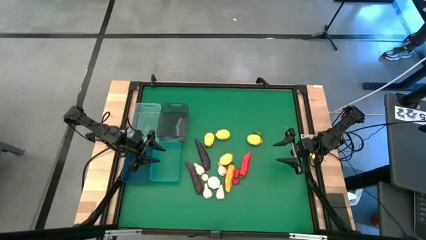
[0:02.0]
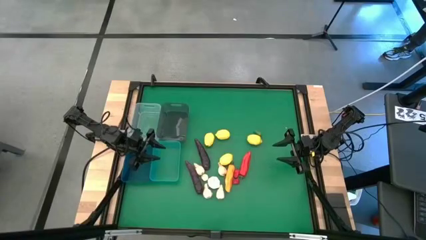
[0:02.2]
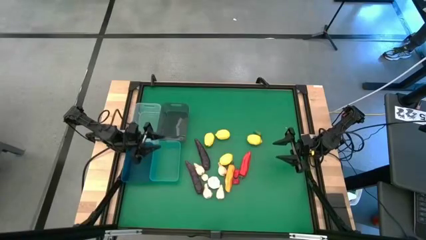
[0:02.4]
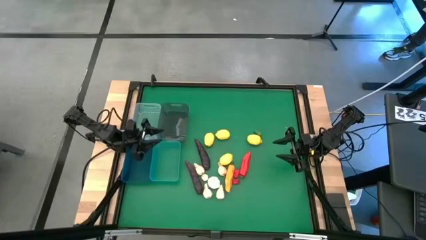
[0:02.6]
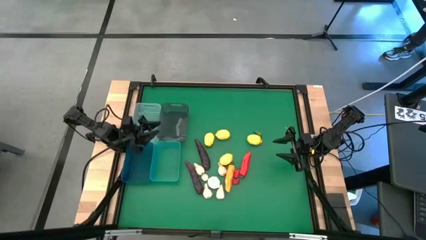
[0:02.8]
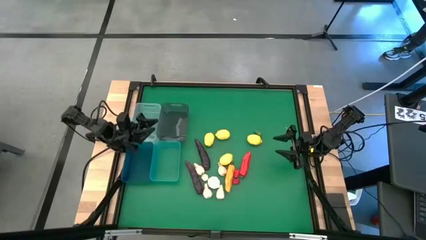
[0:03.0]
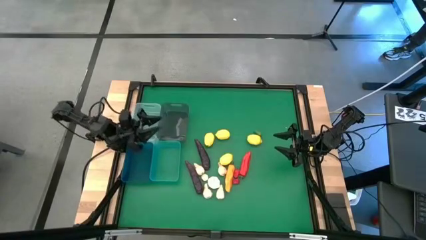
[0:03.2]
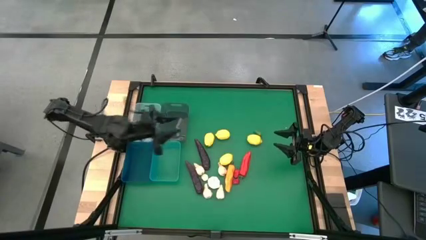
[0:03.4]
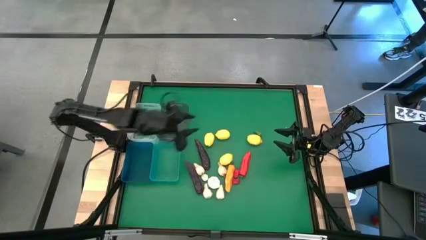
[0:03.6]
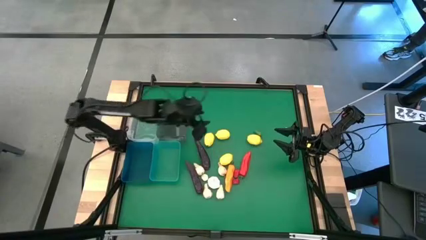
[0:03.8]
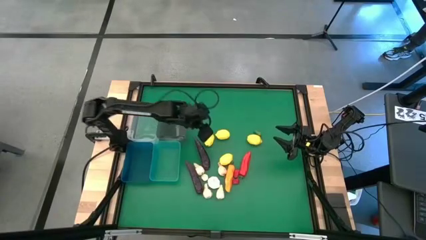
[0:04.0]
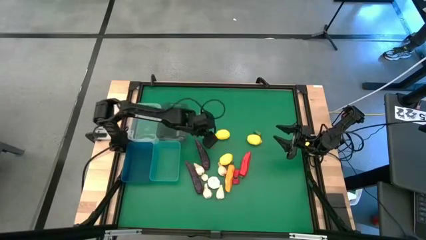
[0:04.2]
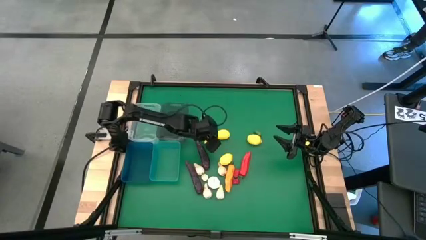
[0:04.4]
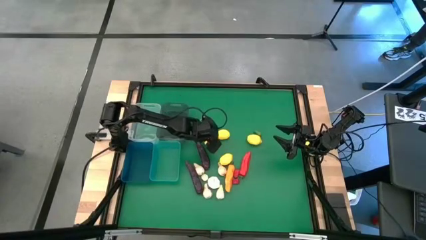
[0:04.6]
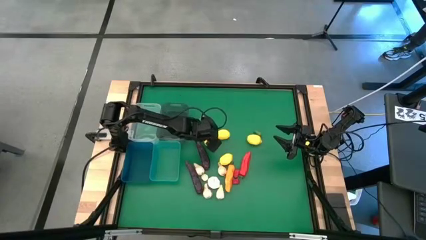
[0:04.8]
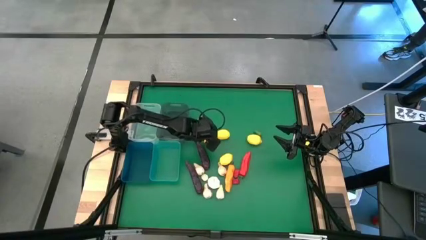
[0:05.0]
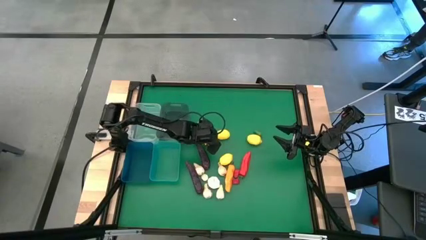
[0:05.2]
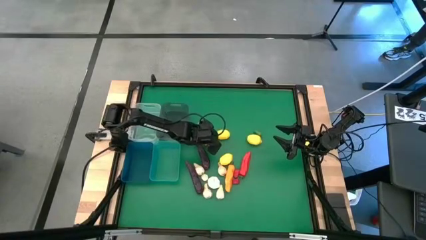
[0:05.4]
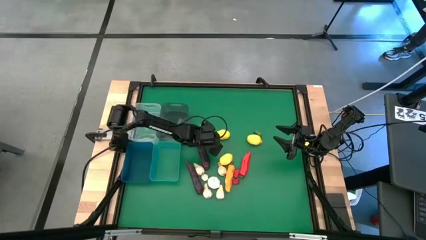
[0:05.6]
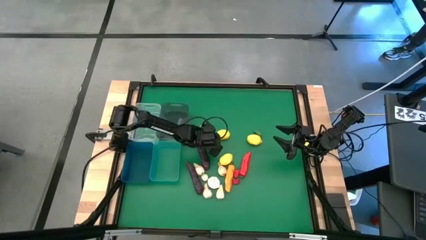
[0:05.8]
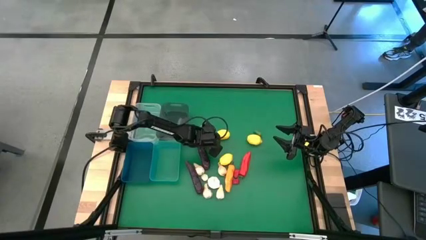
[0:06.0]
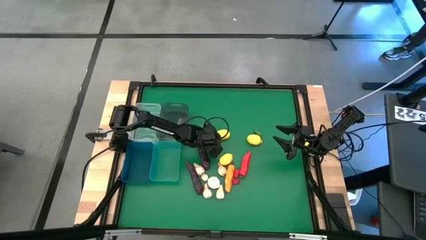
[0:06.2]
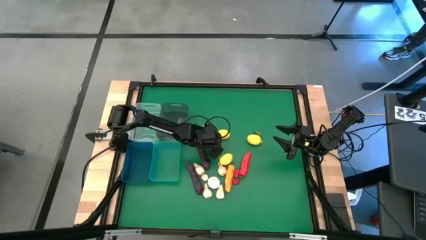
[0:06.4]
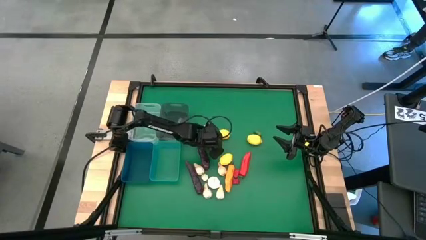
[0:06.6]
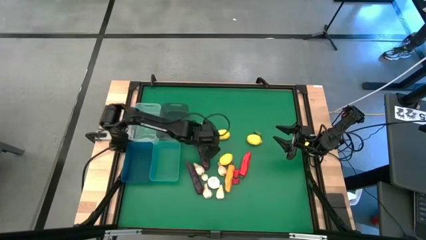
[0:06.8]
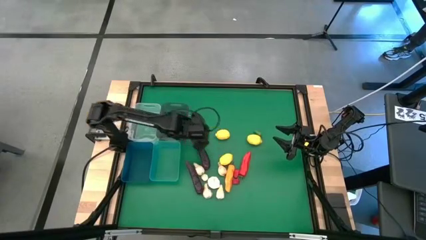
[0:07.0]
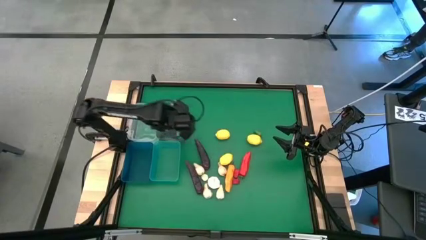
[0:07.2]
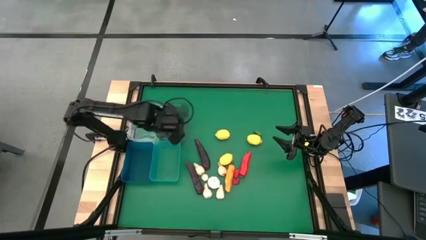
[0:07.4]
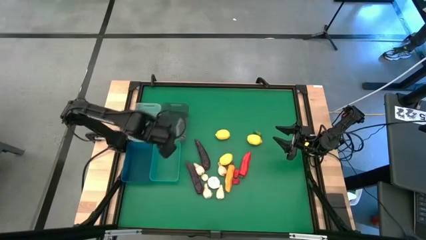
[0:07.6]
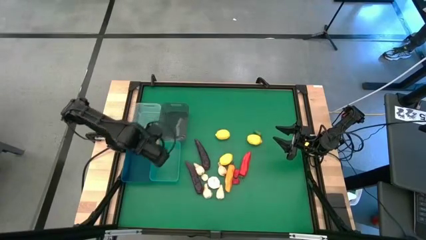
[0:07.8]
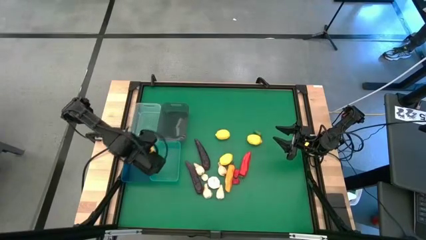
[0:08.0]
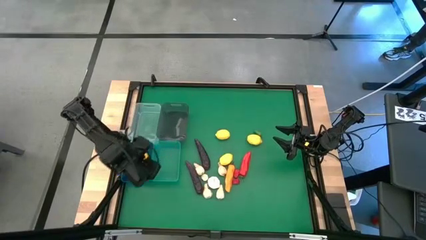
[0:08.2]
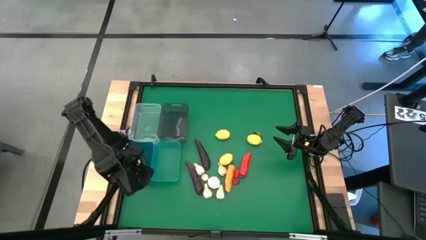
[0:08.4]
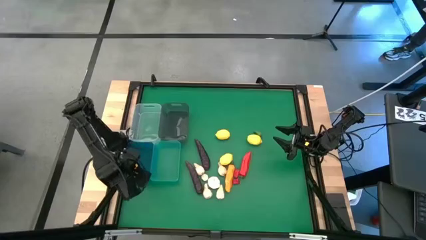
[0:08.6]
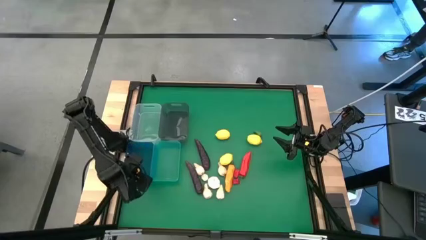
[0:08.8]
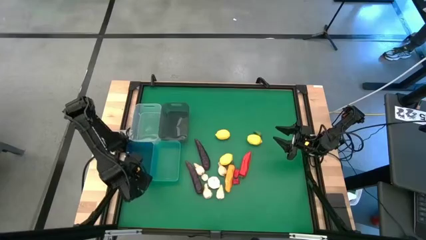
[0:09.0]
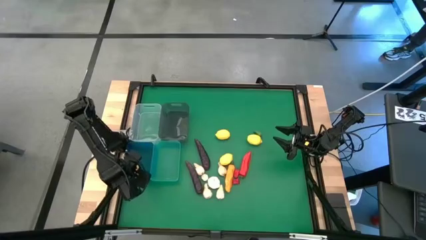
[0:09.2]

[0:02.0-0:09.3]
Task: Sort produce into baskets
Put the yellow lemon into the blue bin

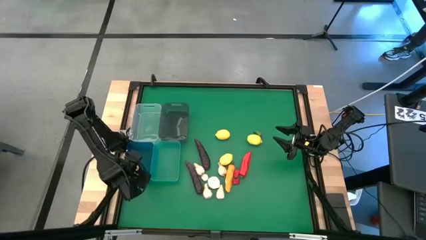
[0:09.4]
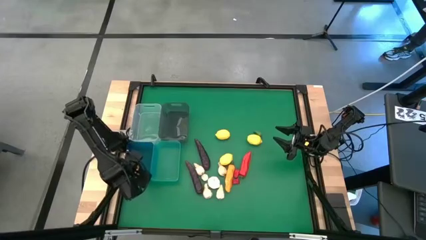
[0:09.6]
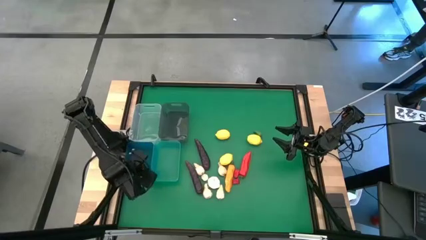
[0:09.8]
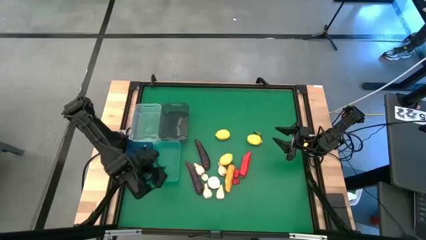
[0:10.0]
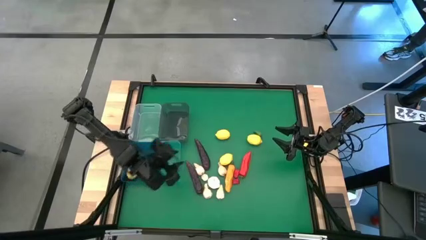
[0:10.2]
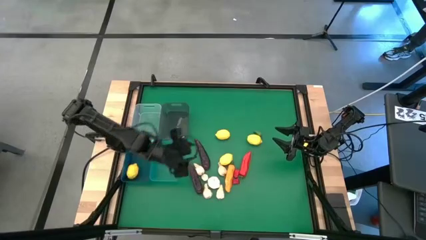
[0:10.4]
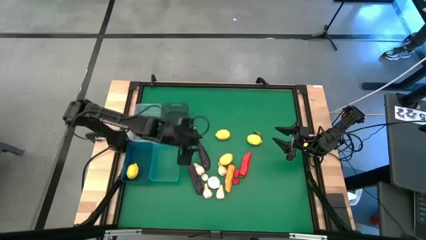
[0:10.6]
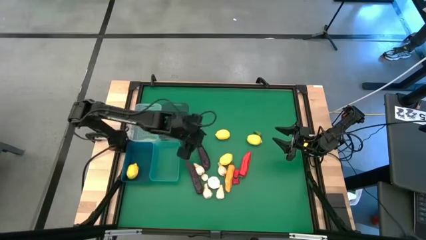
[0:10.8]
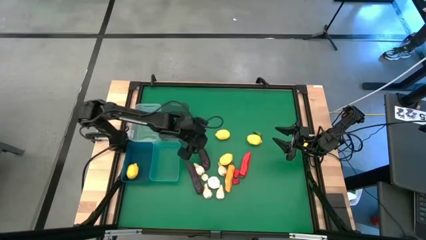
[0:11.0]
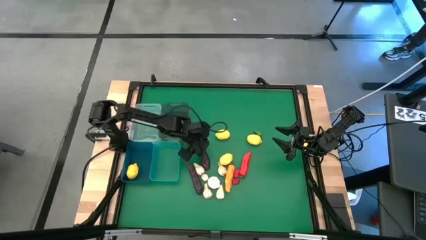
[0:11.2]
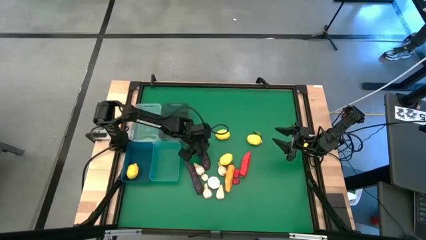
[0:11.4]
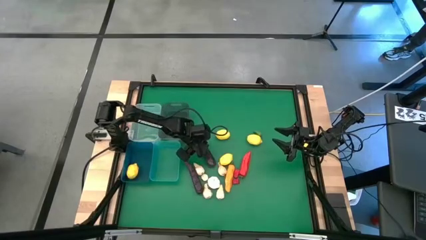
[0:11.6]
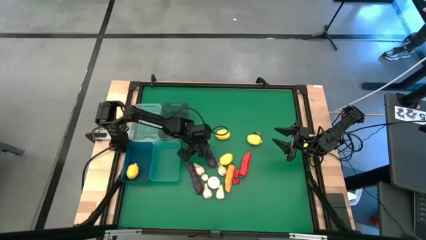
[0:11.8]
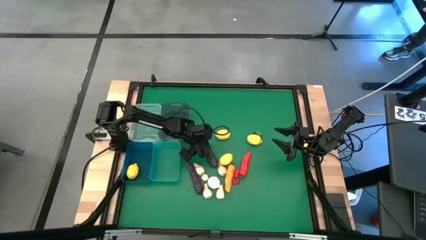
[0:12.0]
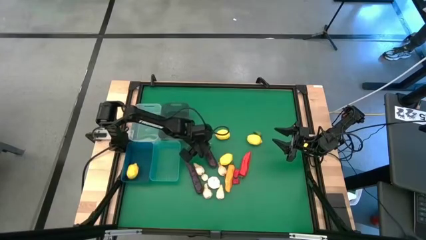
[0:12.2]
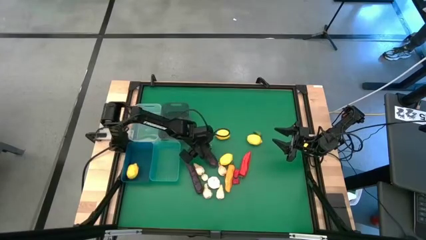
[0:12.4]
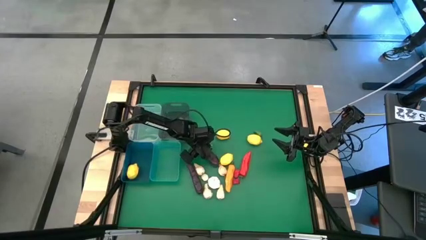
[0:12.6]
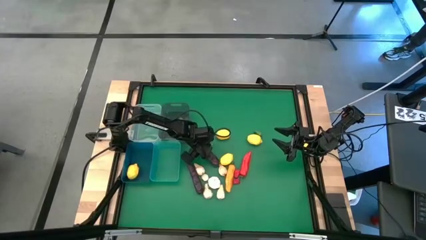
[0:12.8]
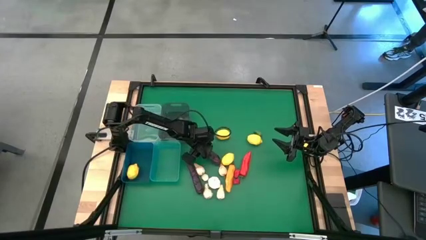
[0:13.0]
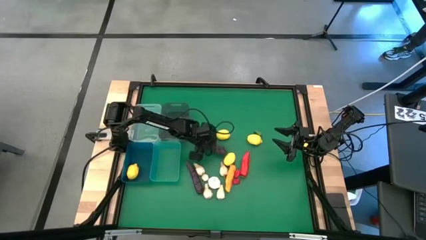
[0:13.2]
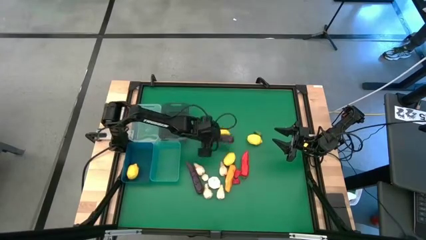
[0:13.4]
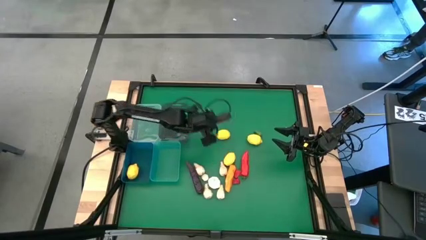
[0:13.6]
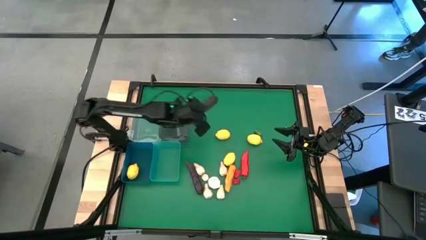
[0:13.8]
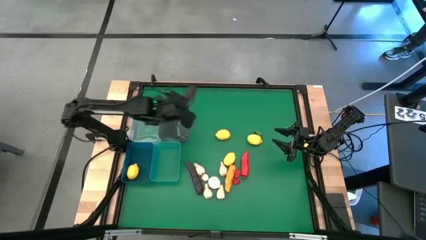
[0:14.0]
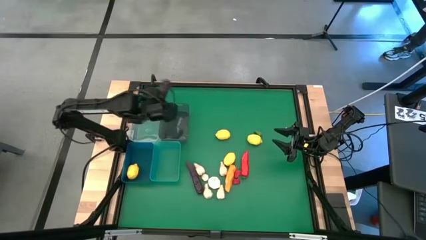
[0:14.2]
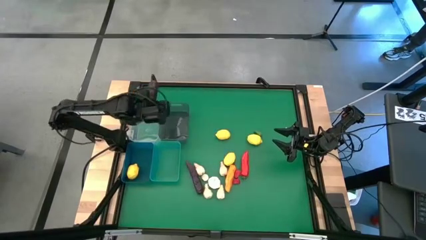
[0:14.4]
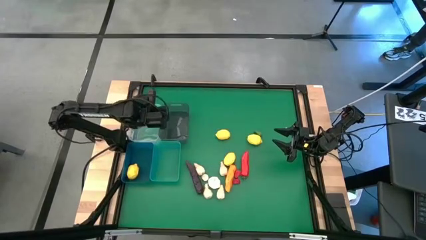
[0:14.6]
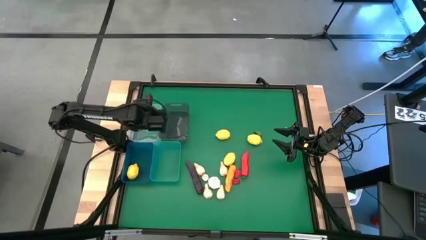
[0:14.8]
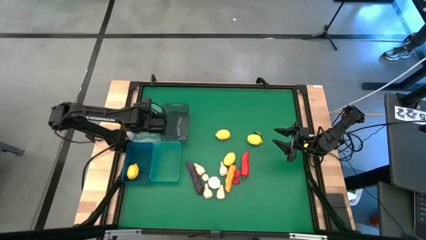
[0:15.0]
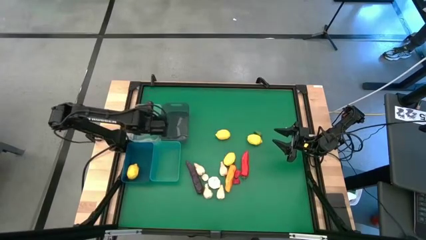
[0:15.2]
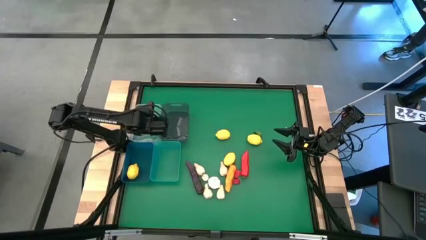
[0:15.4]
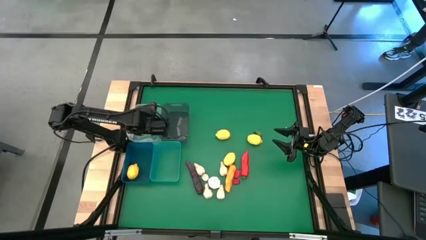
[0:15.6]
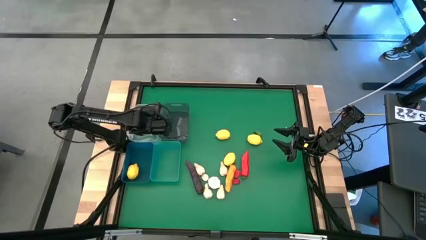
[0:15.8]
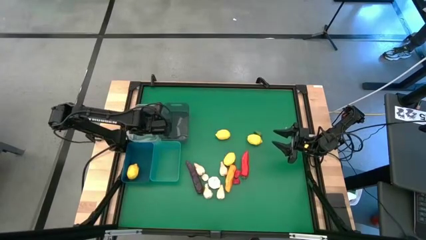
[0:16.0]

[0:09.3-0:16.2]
Put the purple eggplant into the transparent bin

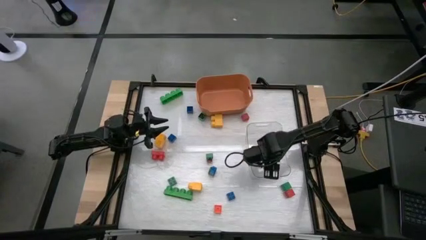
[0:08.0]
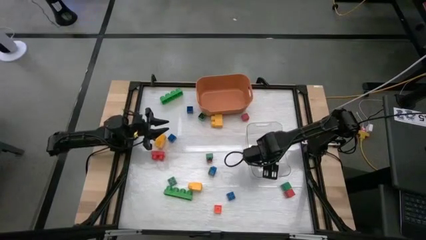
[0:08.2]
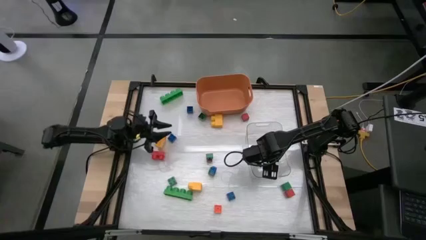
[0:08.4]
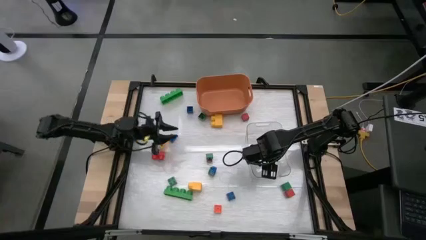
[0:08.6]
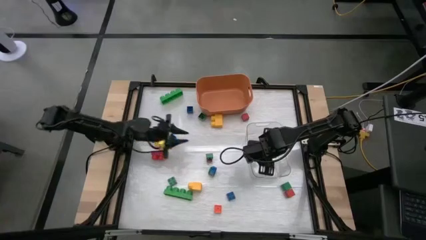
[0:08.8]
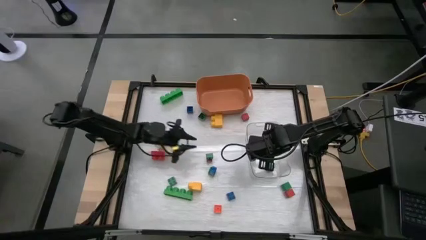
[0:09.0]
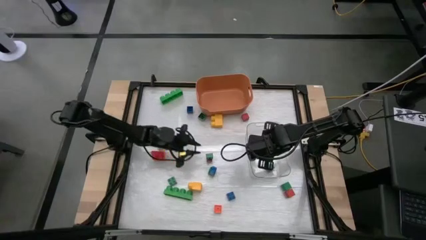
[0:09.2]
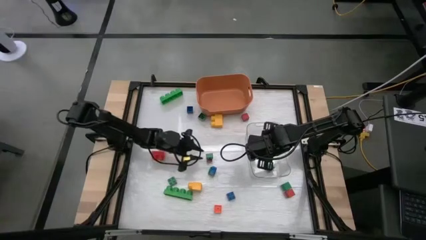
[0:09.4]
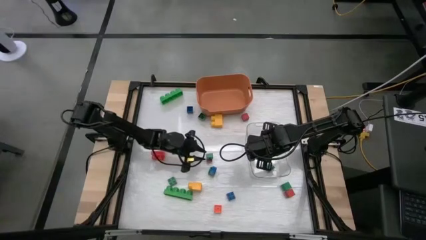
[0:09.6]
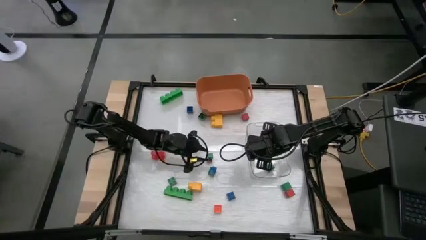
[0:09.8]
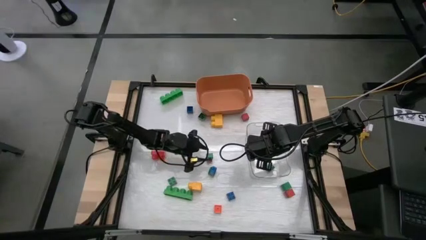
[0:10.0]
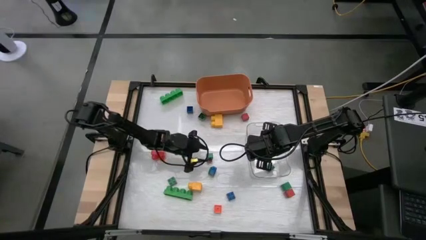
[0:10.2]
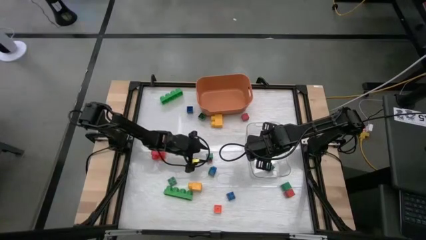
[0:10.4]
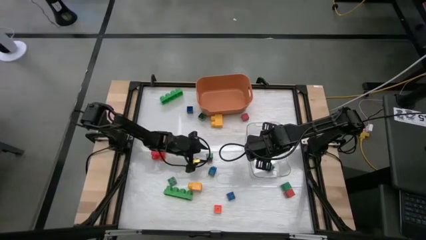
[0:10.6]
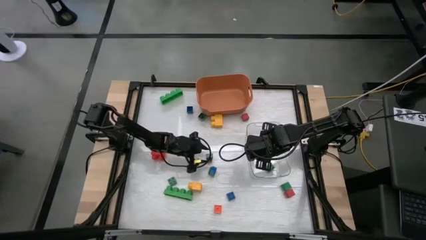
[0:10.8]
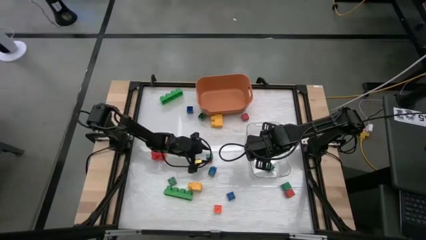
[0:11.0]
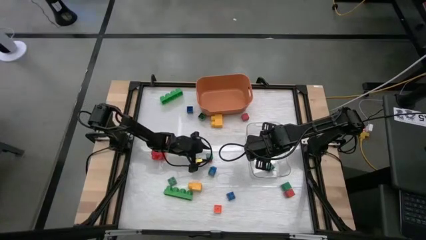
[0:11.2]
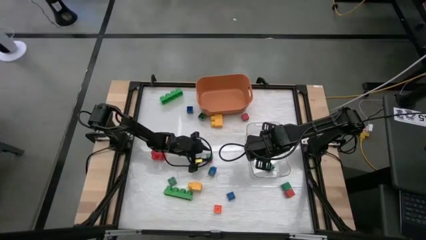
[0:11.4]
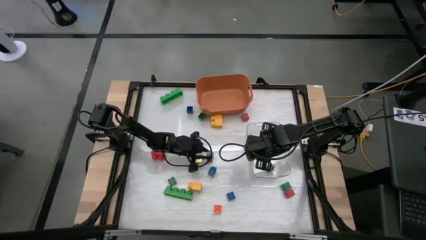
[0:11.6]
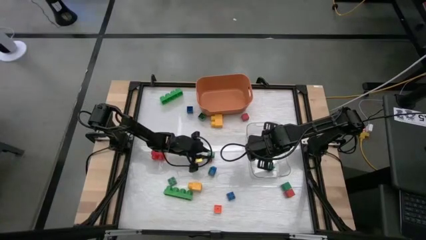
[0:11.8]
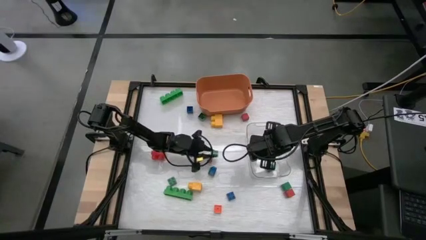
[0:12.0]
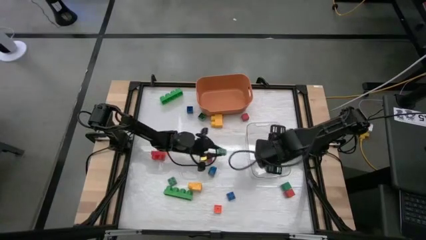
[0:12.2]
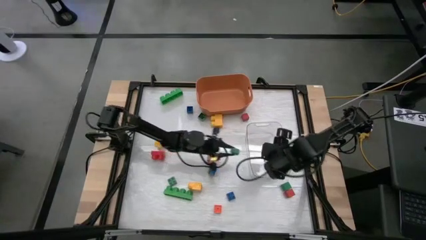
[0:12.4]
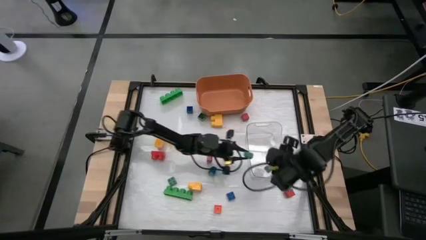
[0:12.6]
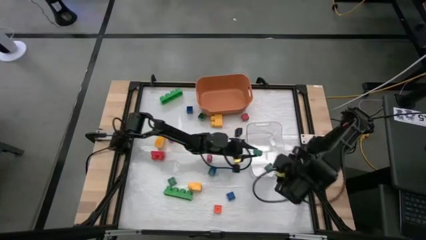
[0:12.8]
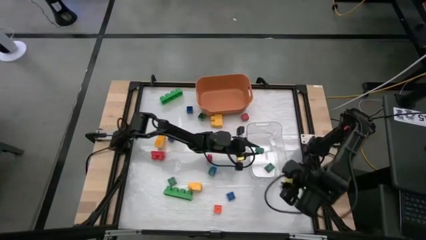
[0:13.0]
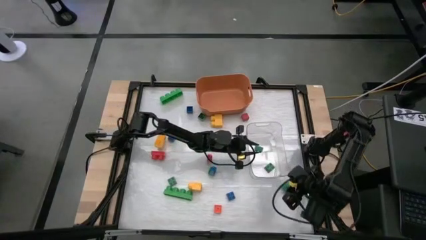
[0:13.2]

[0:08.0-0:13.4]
Task: Sort blocks by size
Put the small green game piece into the transparent bin
